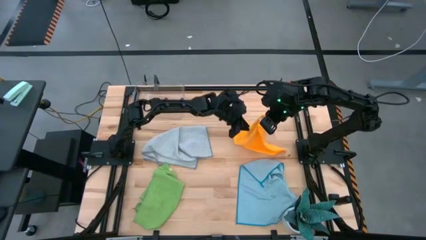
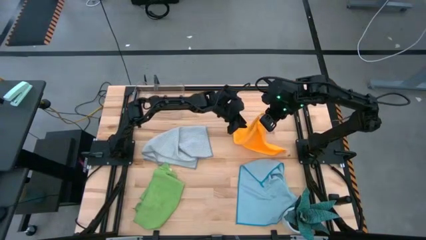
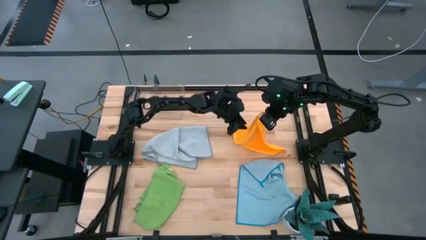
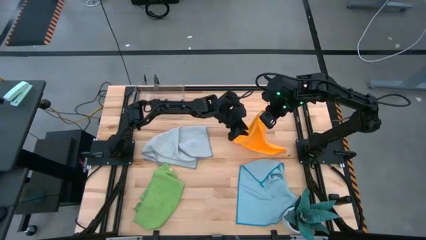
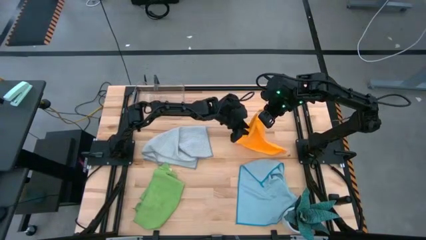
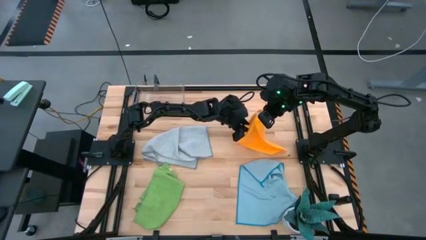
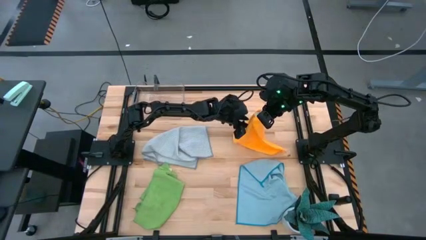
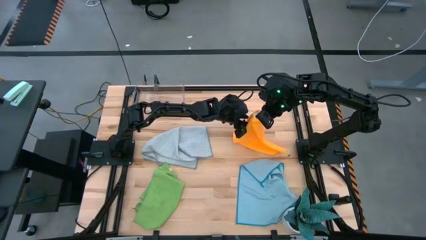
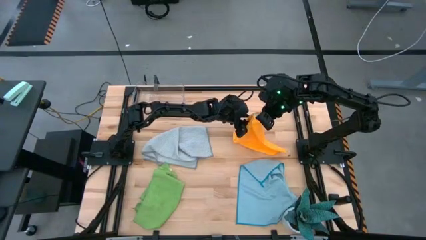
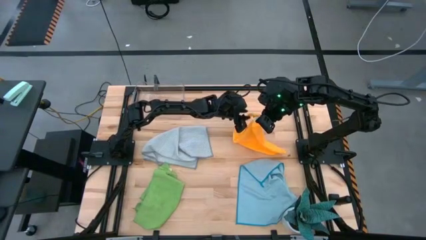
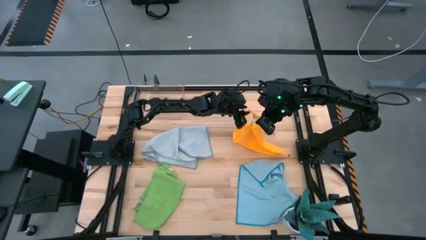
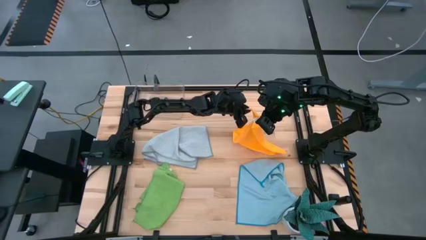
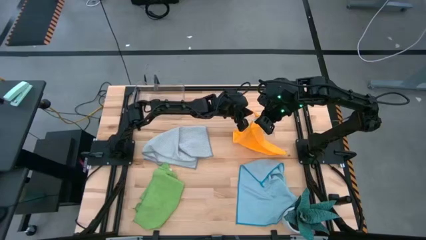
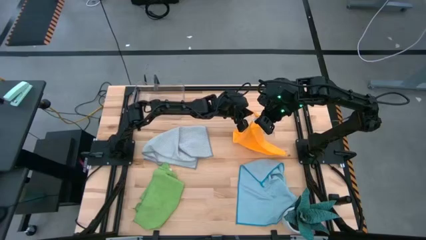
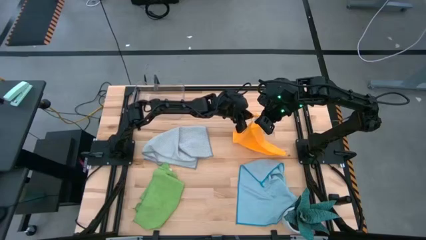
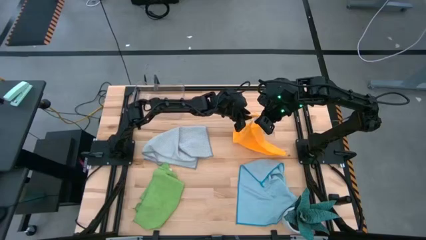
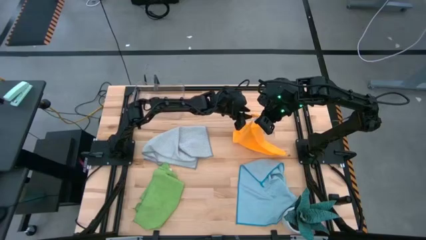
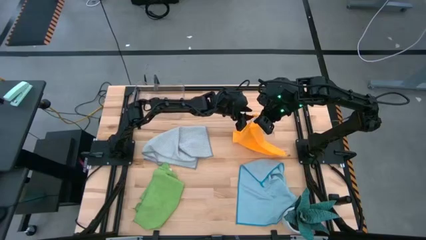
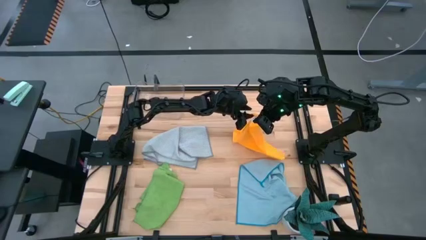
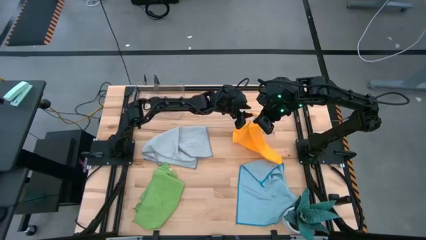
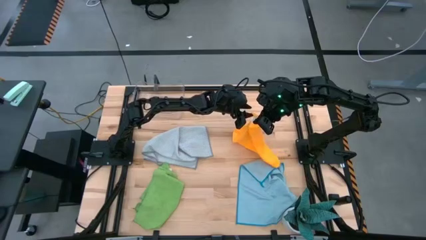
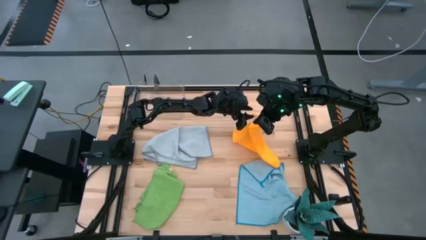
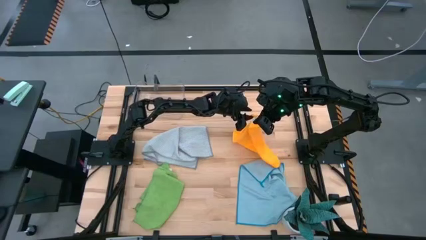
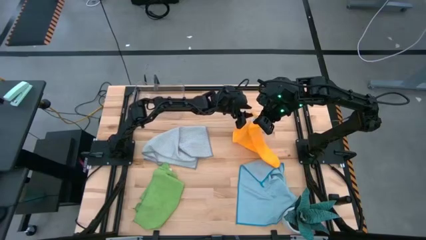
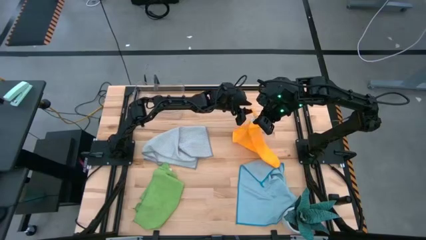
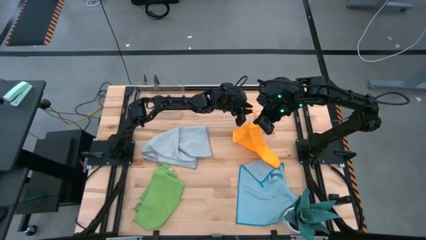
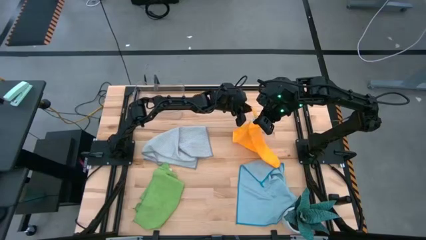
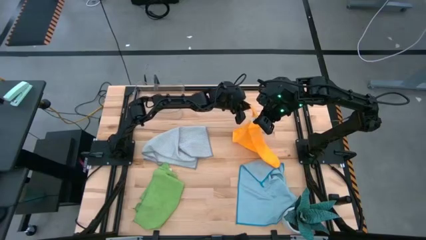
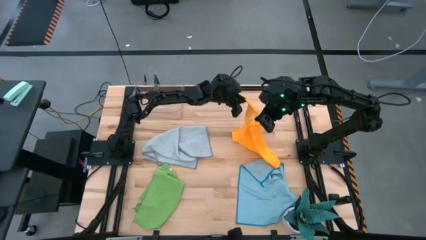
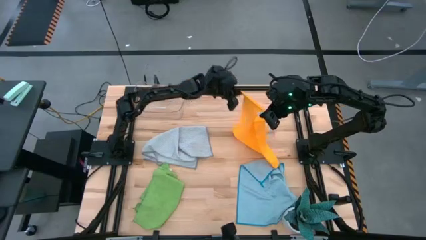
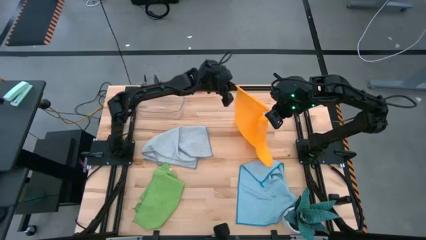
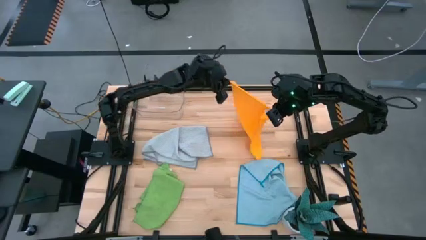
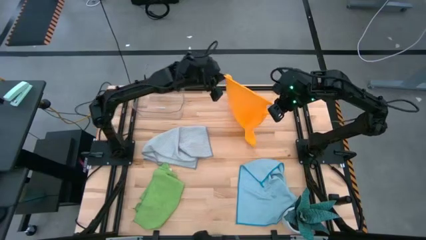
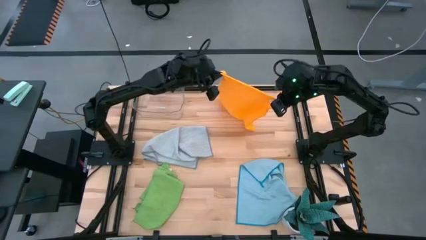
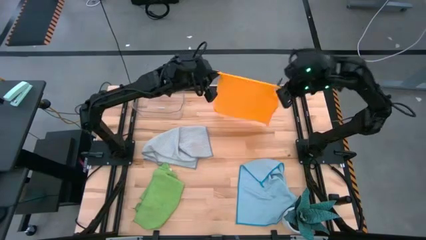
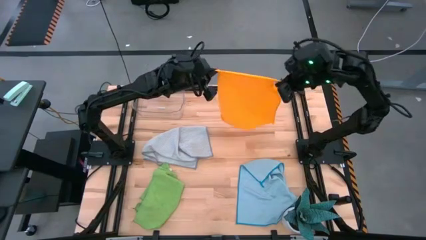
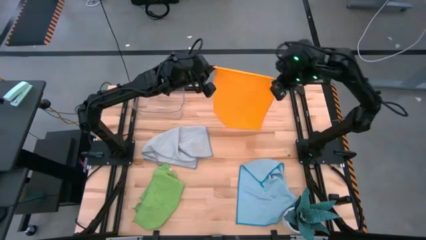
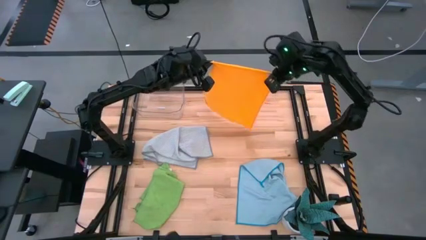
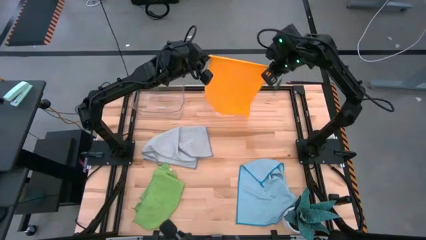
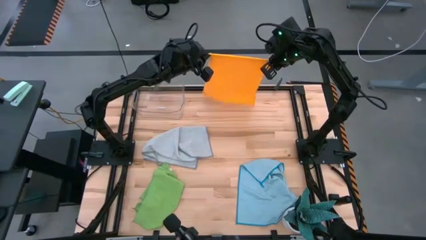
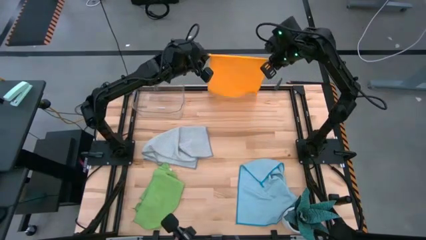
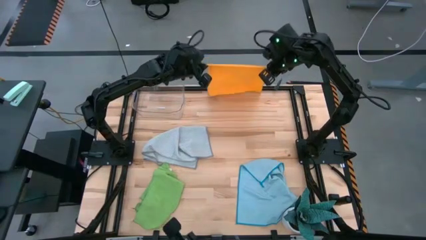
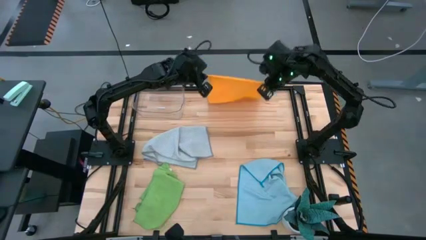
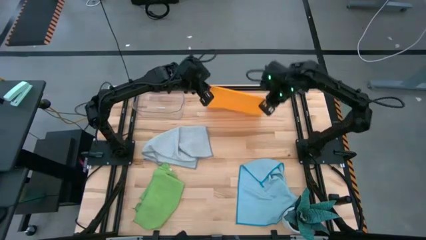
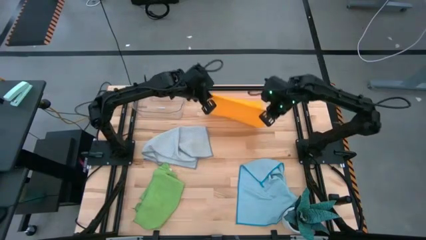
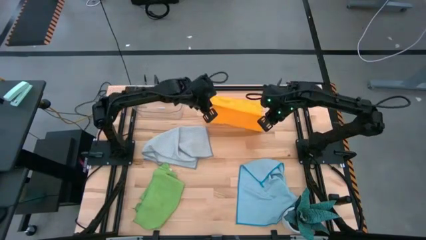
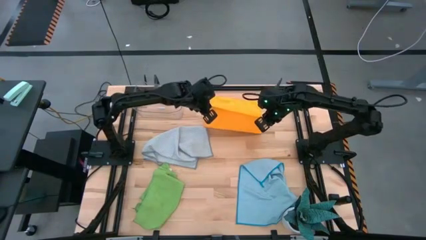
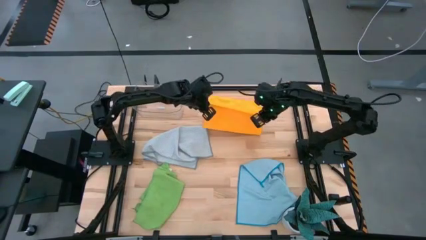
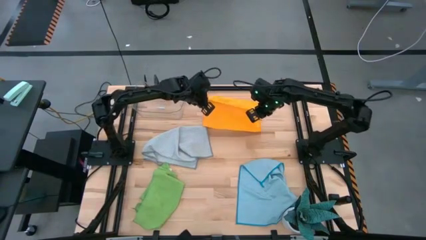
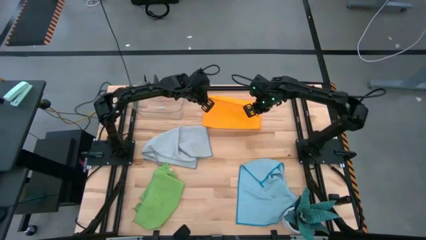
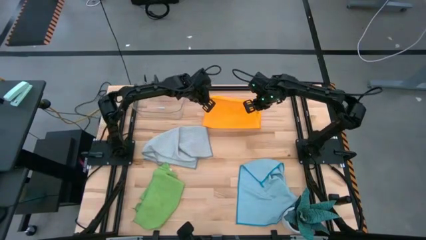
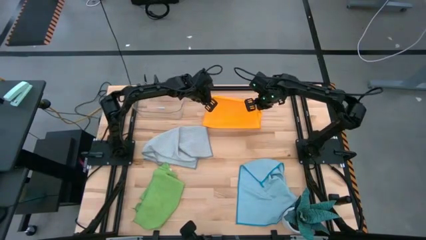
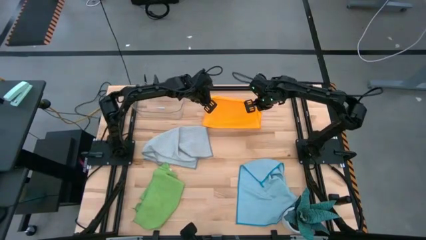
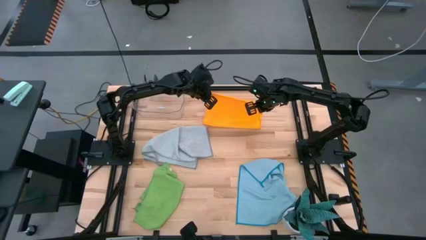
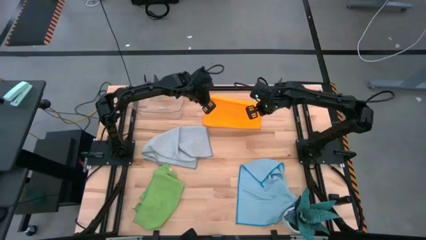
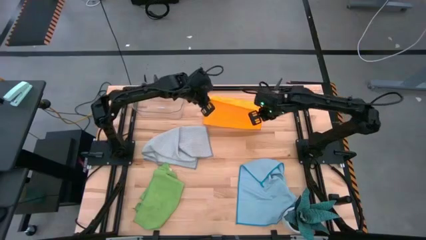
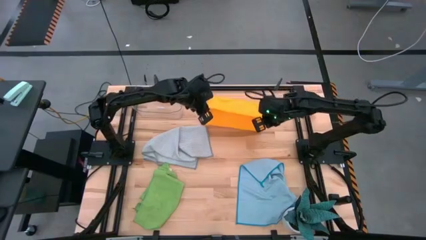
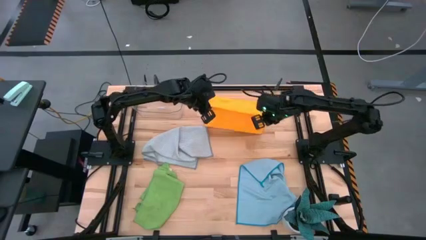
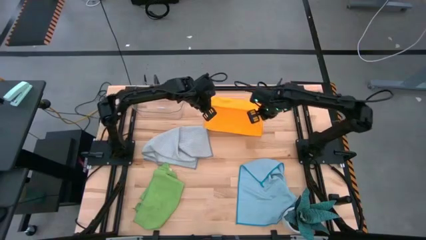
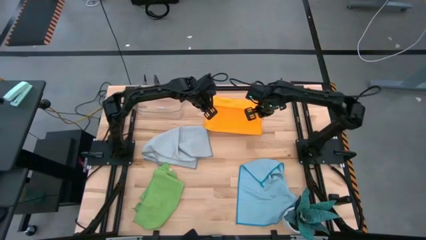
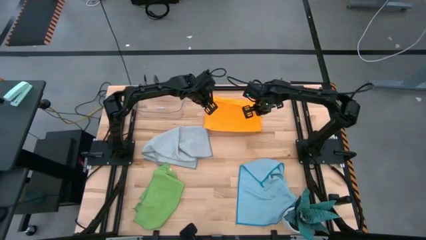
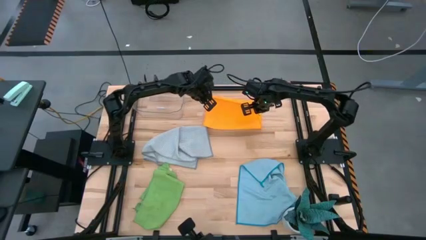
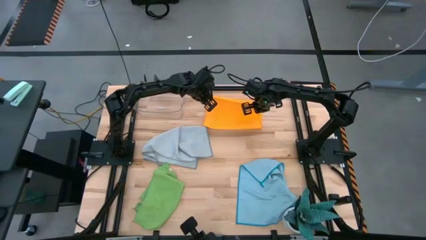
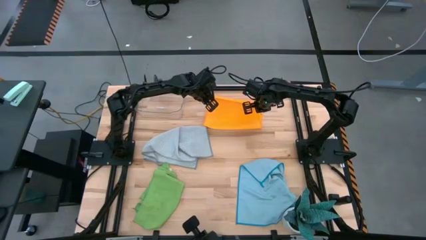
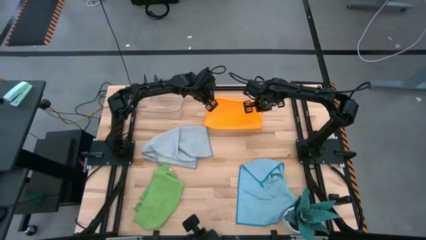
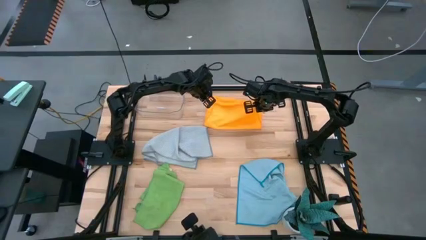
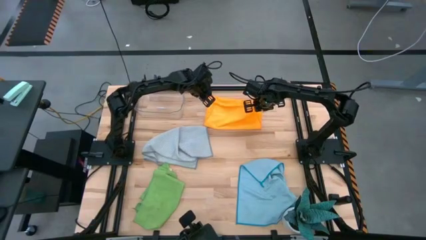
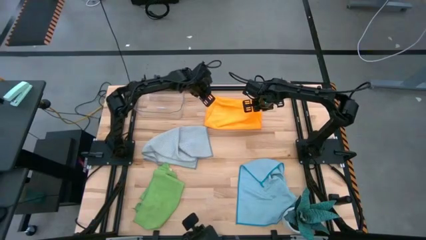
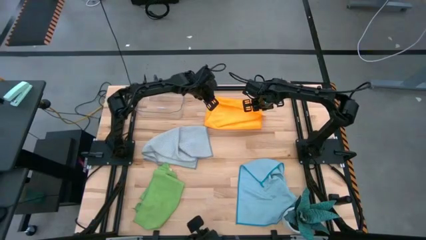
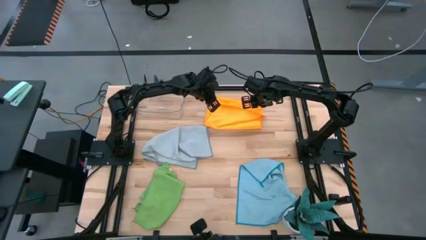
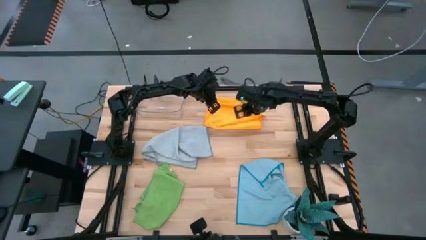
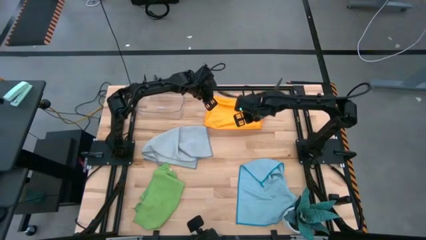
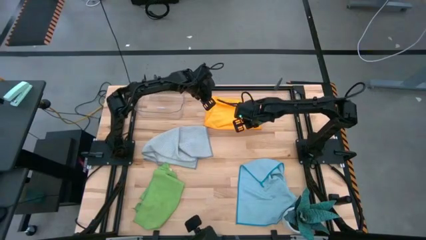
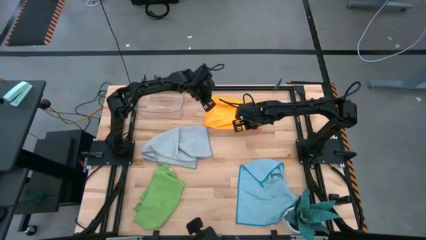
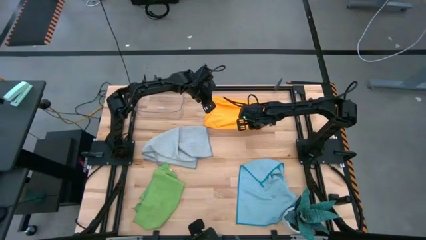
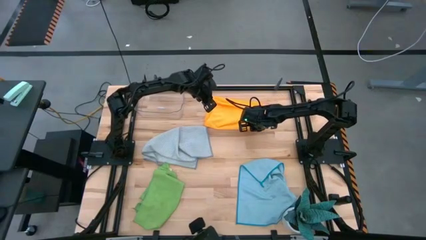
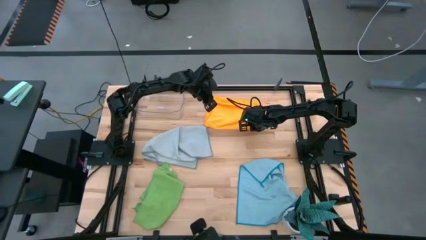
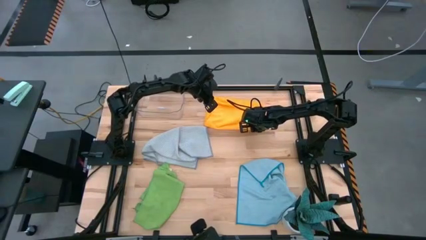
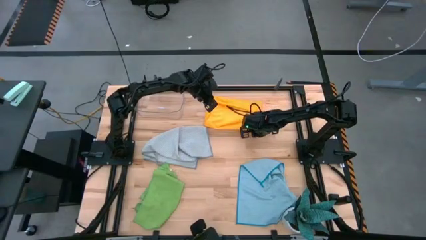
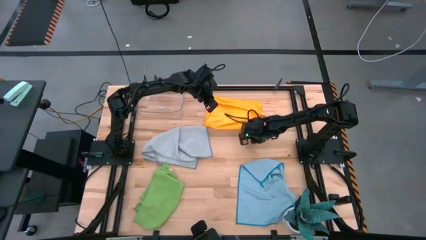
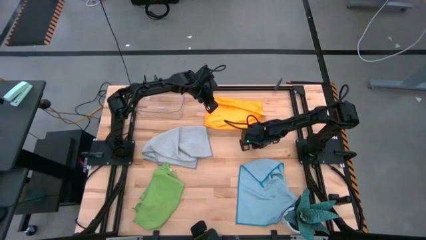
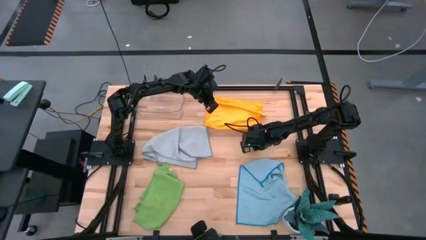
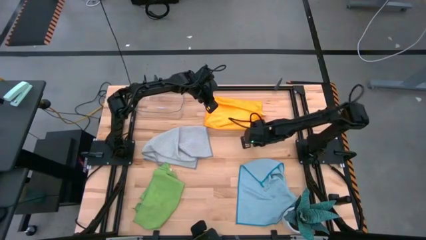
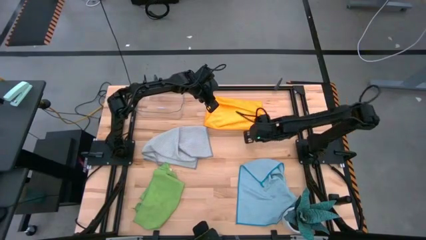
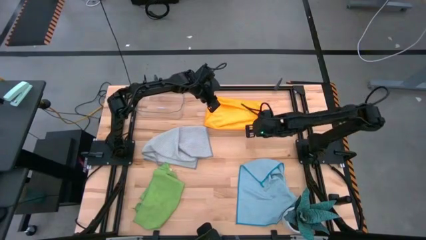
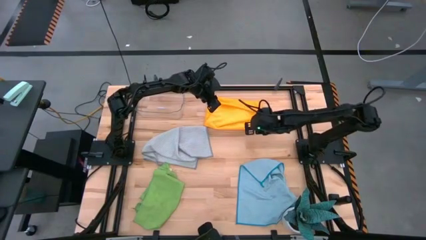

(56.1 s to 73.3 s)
Task: Fold microfiber towels
Fold the orange microfiber cloth
